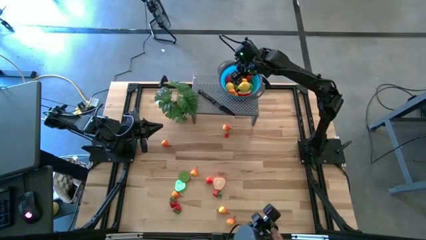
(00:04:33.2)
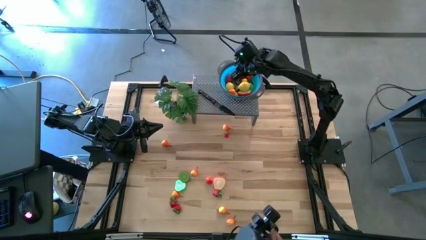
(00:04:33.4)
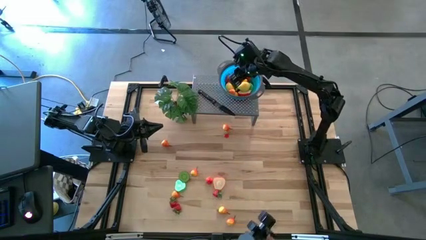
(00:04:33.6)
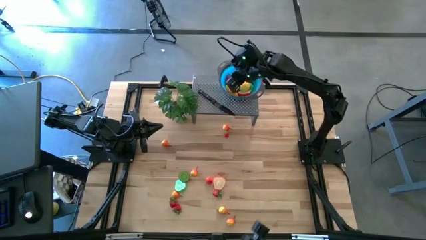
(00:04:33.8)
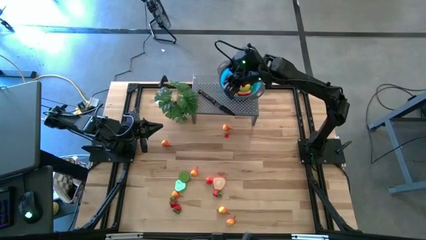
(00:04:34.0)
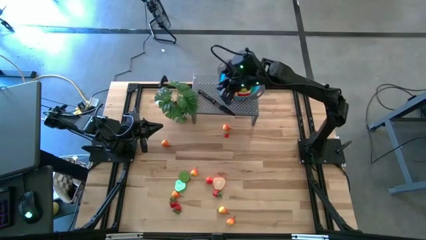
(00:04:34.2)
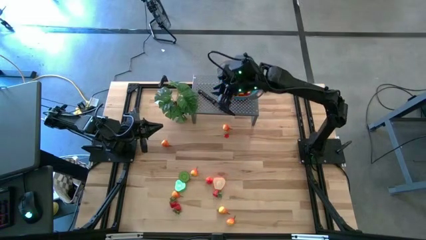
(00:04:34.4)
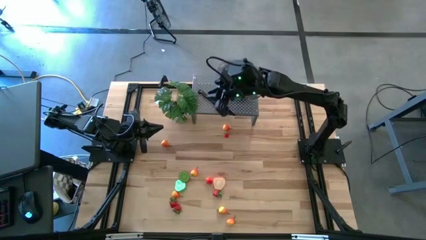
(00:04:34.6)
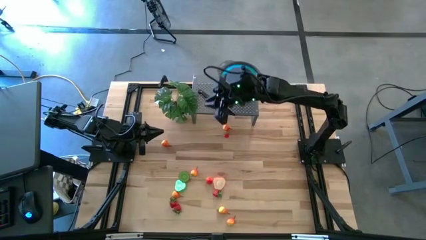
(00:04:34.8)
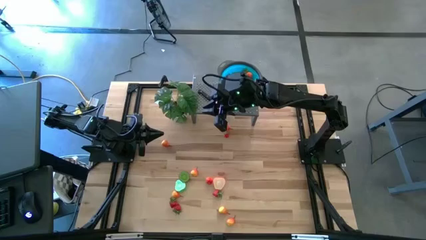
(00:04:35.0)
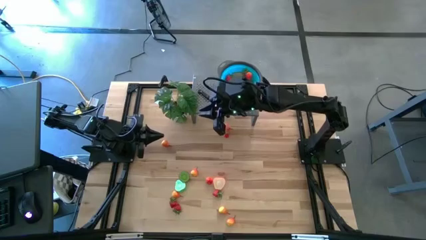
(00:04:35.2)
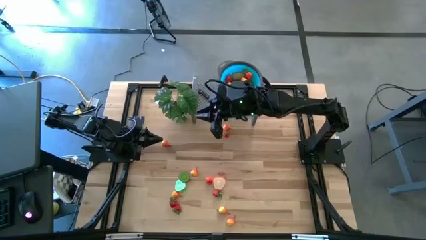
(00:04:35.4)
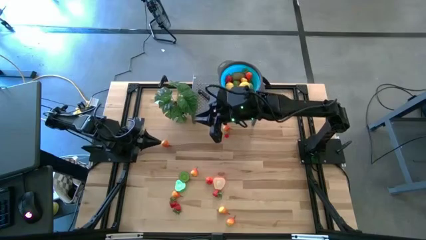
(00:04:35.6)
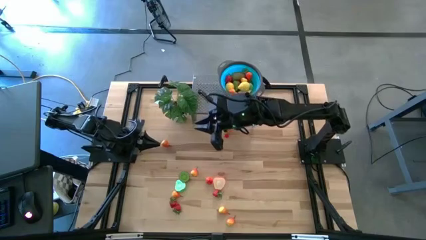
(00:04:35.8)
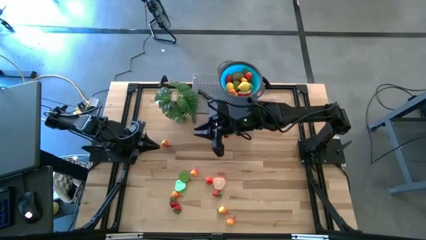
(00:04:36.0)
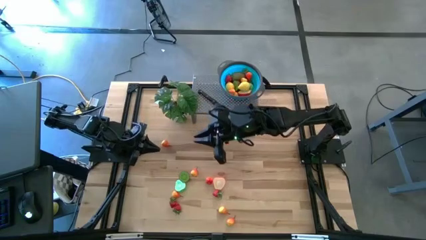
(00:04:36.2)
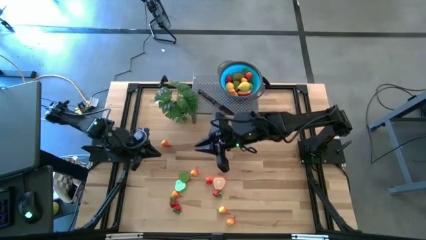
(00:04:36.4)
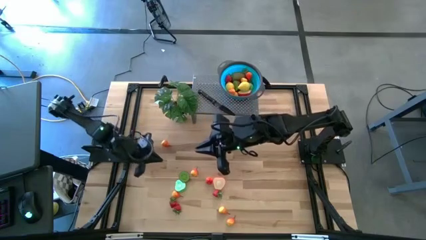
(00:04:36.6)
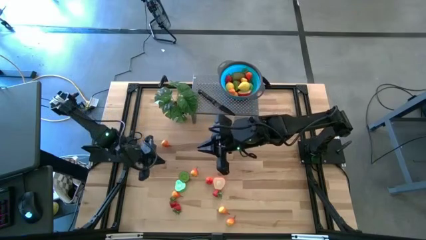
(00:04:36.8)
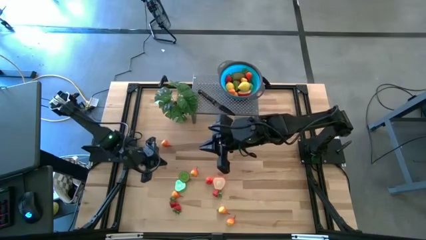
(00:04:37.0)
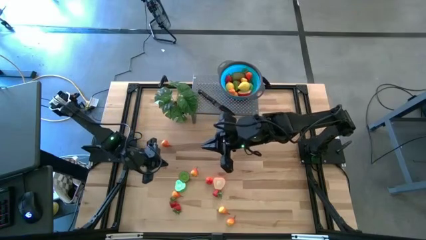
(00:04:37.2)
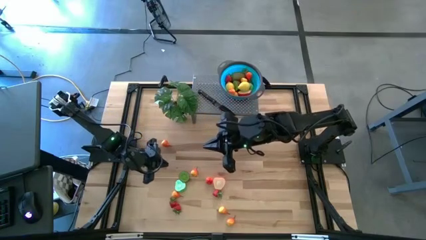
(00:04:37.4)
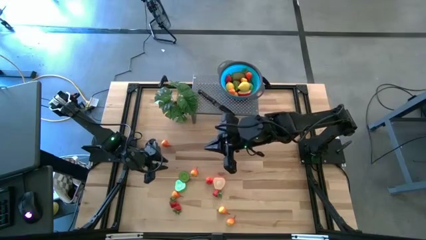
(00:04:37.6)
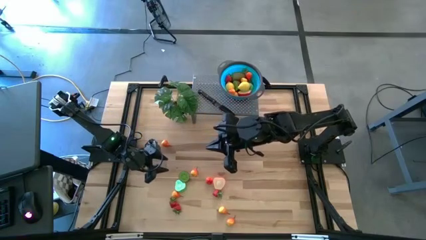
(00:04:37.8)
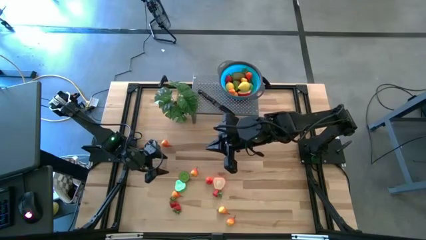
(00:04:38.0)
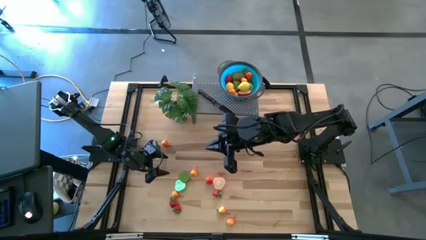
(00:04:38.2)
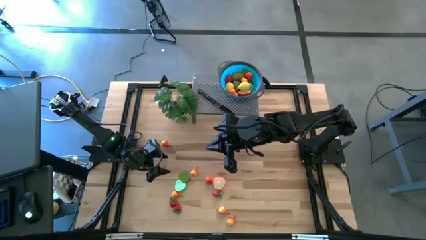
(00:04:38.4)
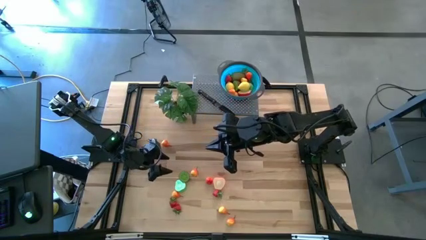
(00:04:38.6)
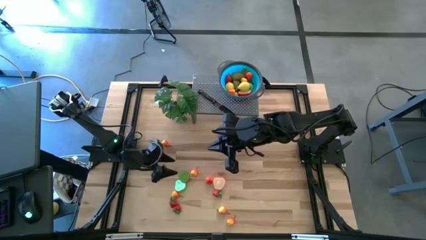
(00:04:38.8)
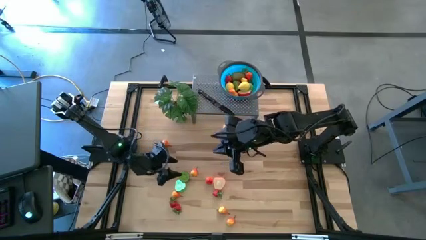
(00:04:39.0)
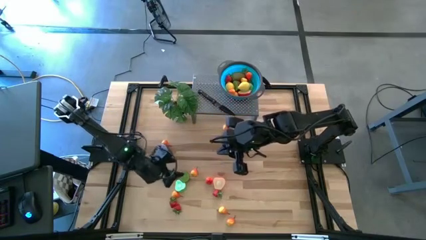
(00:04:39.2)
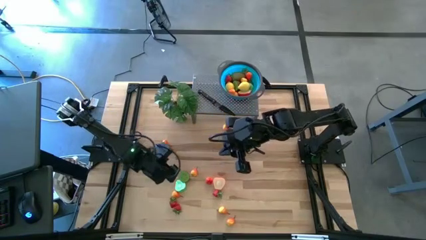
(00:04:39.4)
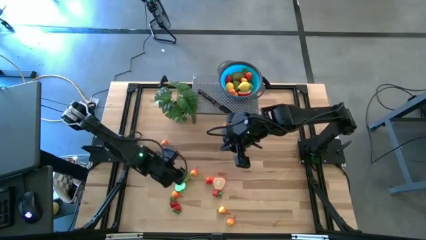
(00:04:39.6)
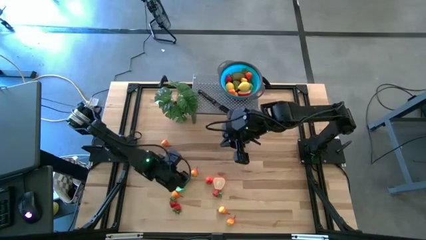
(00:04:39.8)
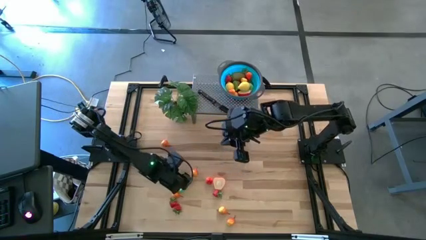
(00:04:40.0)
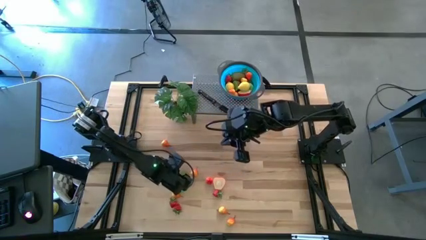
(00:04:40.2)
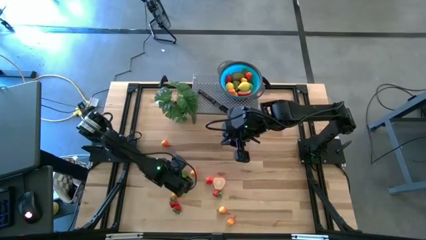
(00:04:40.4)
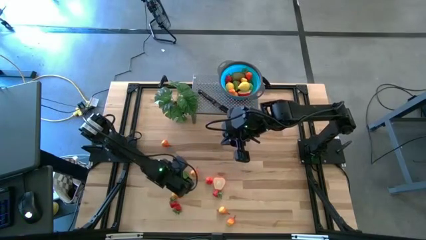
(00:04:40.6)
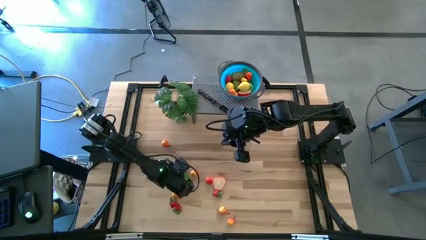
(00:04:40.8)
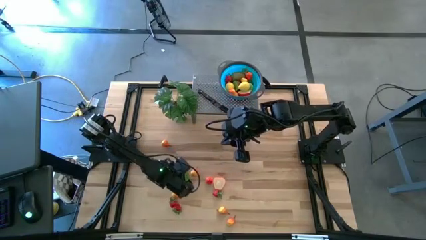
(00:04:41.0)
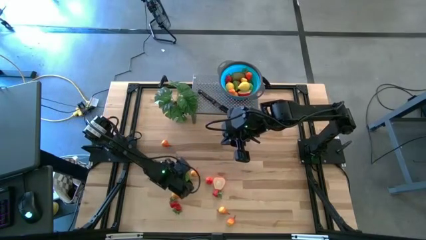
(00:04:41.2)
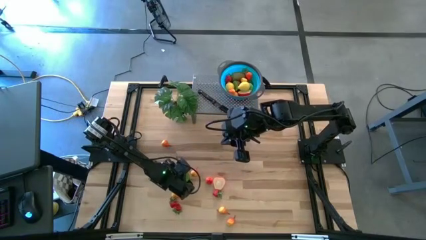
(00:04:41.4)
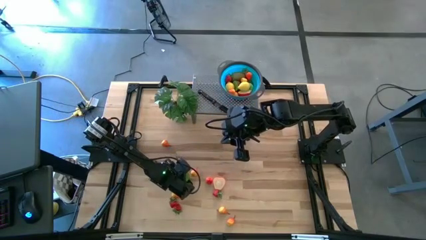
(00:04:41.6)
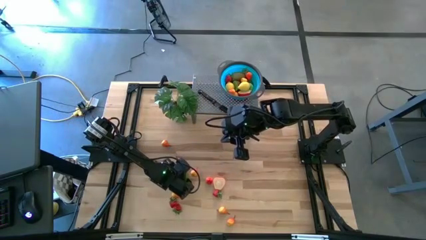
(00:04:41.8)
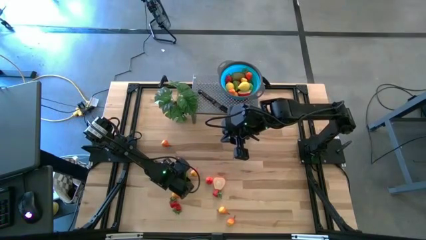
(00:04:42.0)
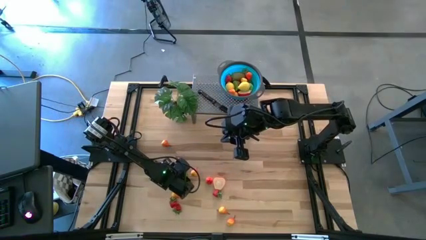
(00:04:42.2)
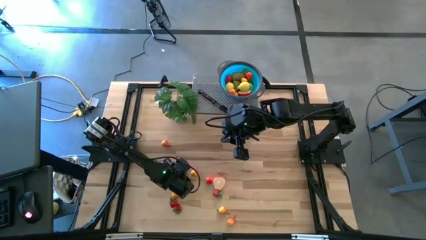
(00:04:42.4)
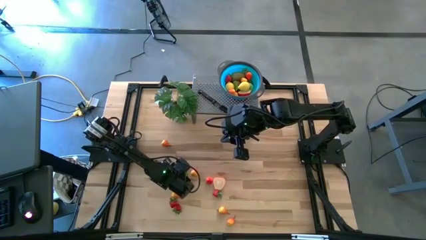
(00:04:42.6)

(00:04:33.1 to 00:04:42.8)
Task: Pick & Place Fruit
Put the brown kiwi in the blue bowl on the shelf

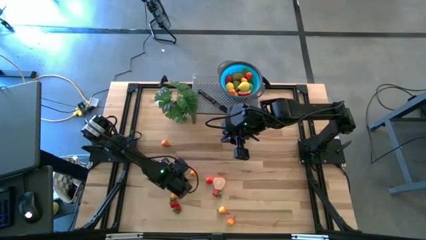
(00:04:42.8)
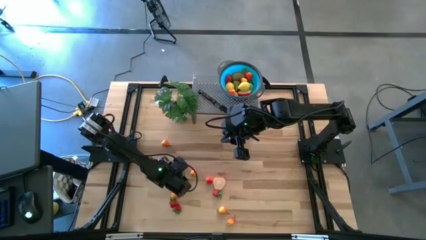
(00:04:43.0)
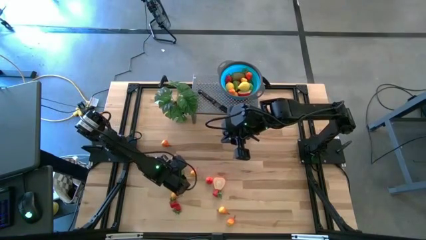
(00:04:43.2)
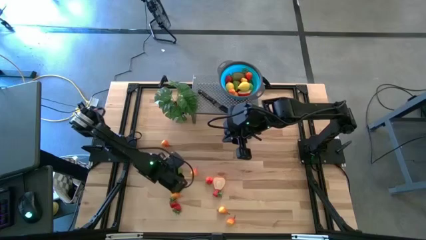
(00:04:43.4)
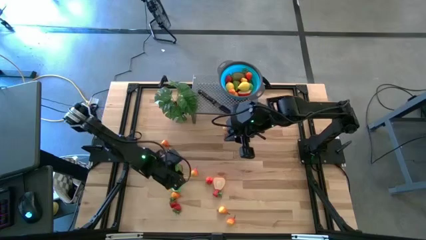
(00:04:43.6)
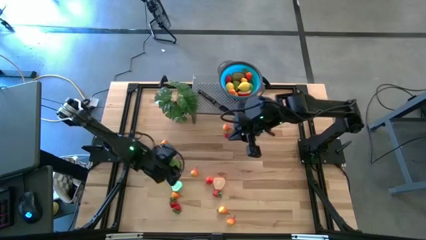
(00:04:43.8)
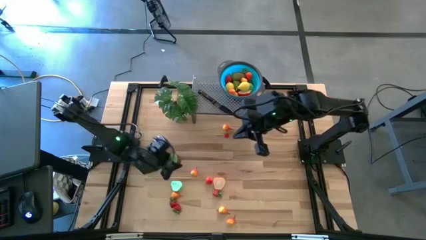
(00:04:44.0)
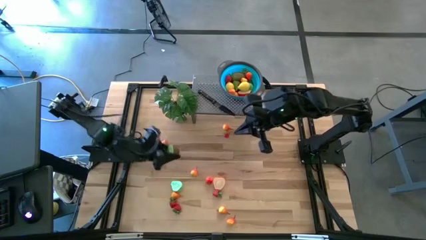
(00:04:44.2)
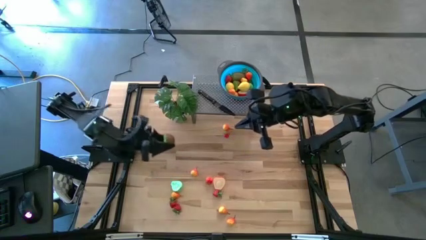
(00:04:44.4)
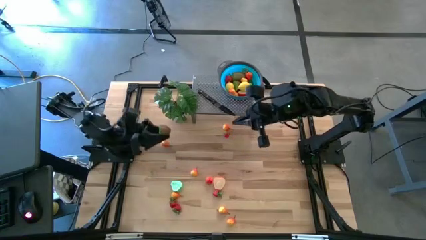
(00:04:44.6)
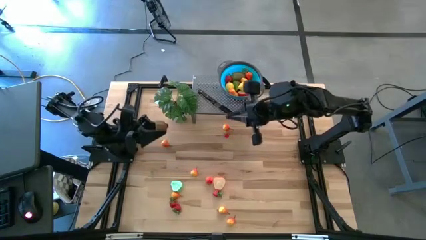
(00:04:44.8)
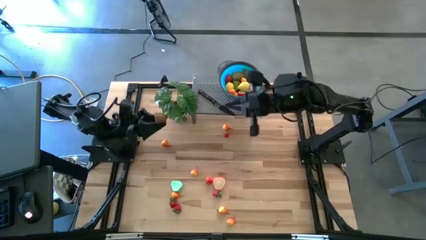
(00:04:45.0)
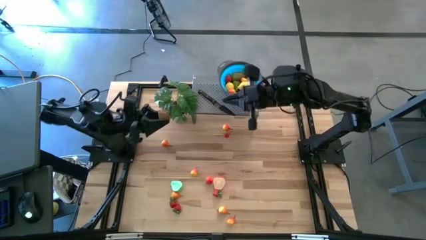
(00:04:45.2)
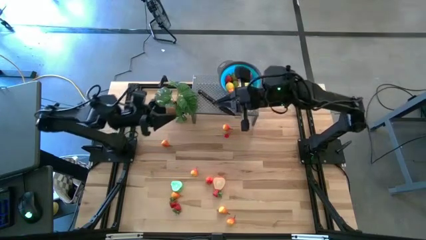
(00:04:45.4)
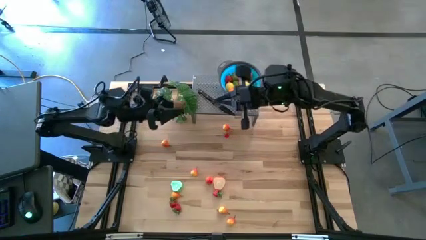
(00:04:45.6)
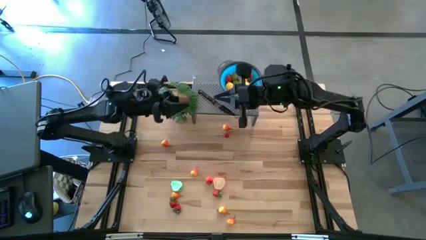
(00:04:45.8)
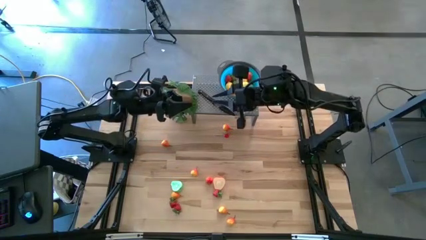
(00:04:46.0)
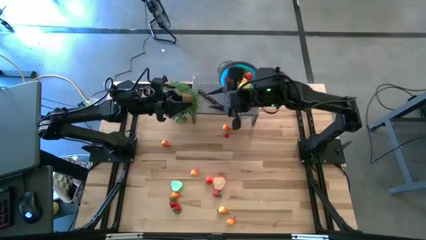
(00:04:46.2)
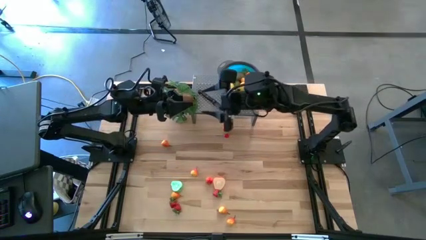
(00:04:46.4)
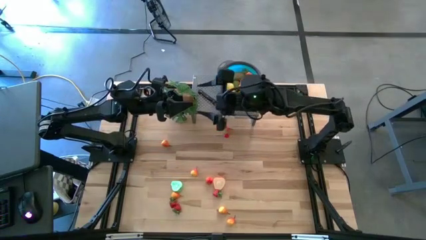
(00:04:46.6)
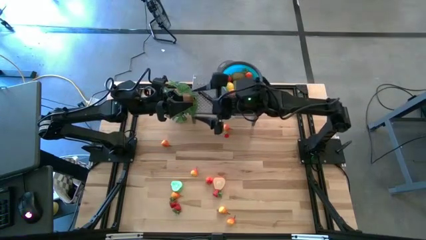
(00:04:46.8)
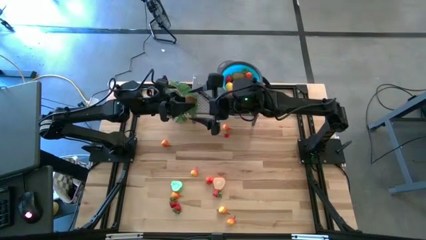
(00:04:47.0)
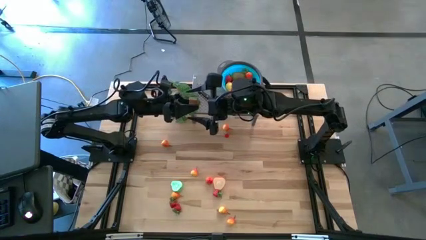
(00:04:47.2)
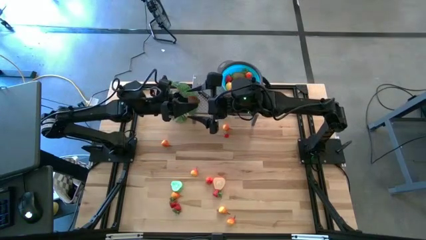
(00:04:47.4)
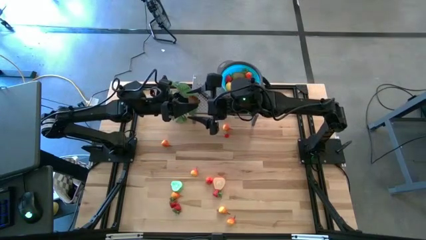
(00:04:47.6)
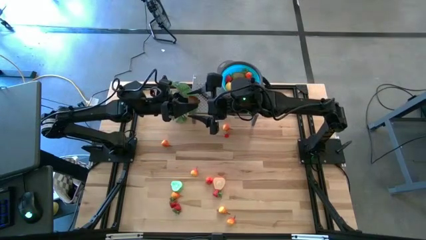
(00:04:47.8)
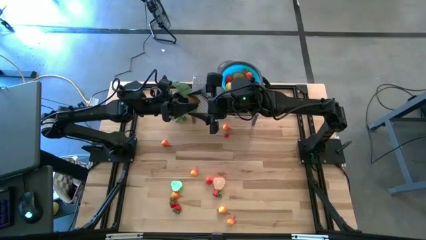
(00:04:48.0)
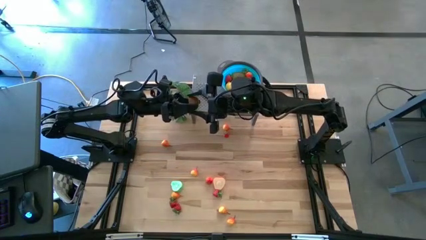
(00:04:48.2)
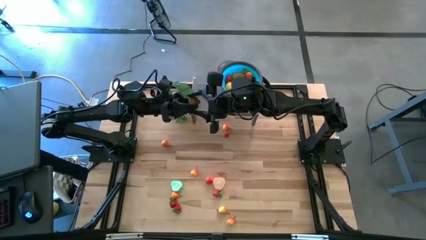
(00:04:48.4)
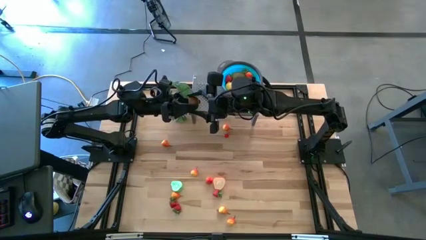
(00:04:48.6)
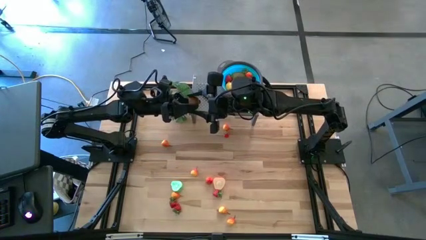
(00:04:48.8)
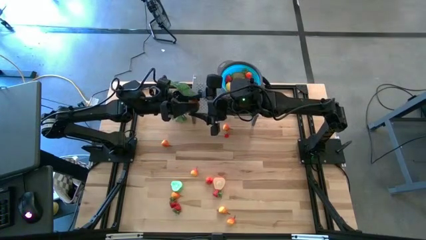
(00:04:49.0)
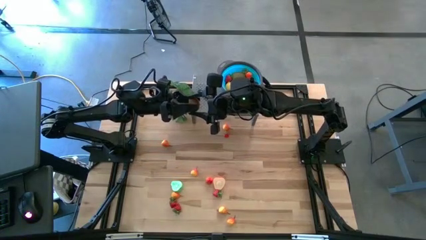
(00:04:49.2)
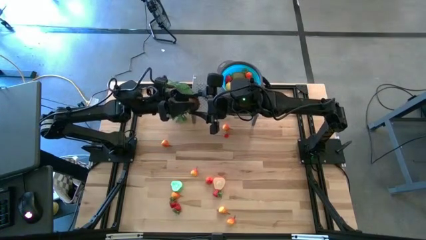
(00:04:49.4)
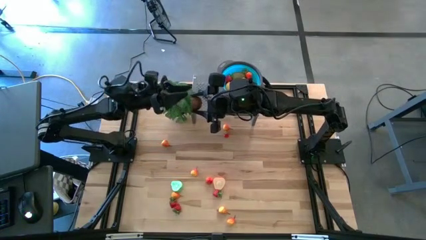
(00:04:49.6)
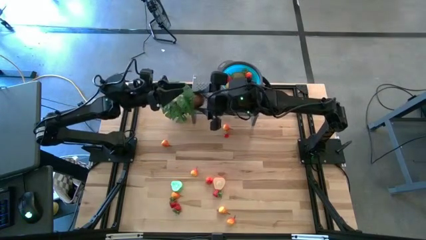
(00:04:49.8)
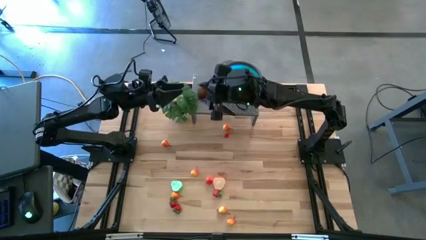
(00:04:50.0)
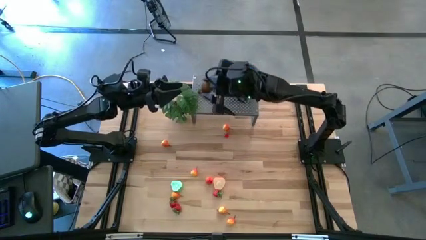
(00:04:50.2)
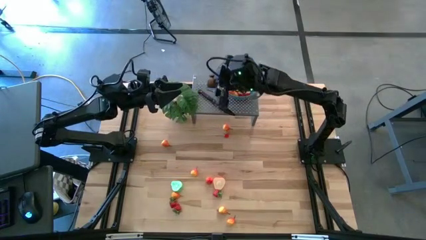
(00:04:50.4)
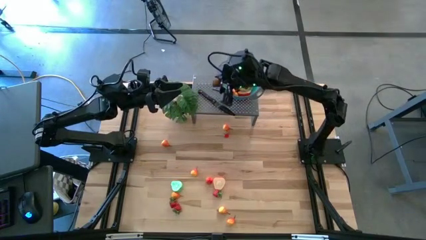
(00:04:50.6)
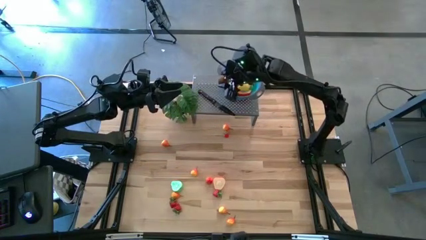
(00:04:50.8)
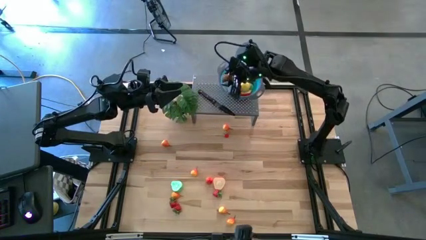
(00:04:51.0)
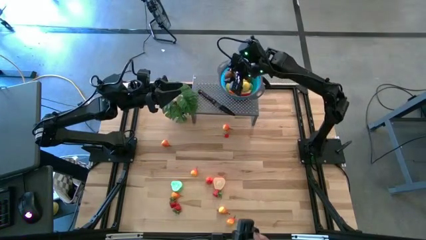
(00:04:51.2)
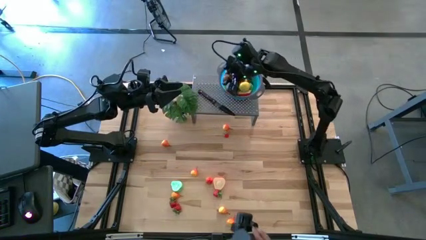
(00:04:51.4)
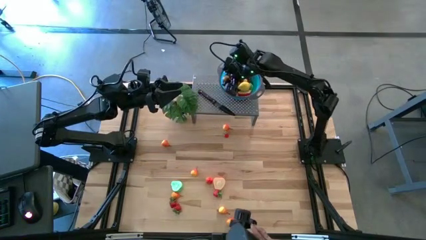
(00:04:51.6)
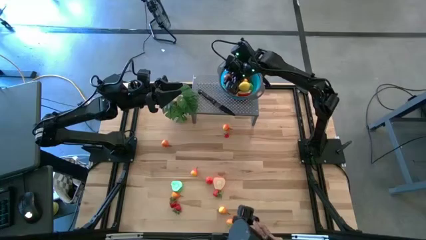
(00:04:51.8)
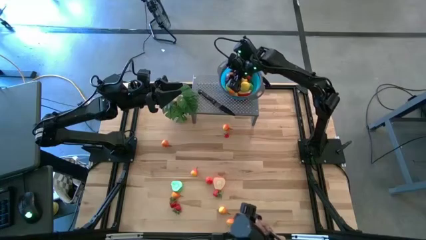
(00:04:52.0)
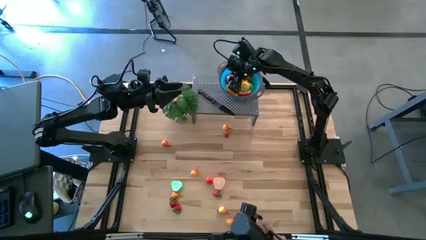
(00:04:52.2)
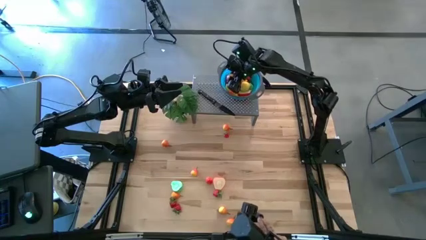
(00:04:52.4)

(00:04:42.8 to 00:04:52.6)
Put the brown kiwi in the blue bowl on the shelf
